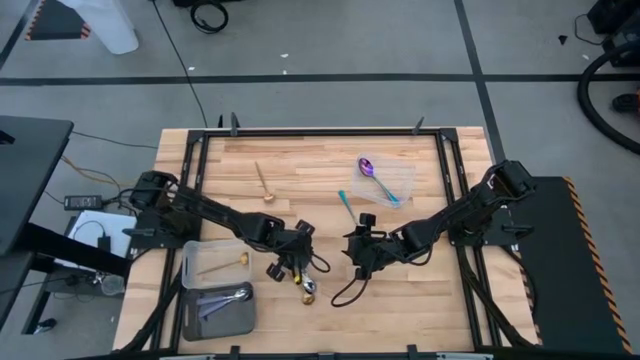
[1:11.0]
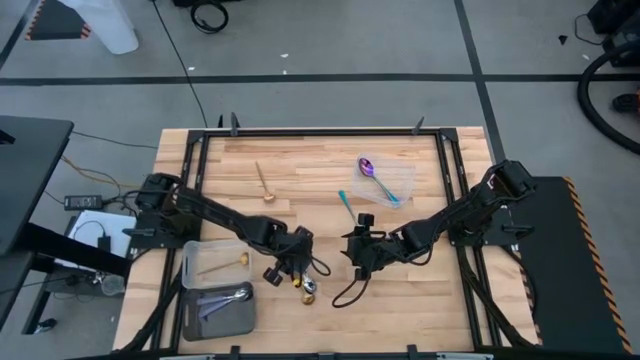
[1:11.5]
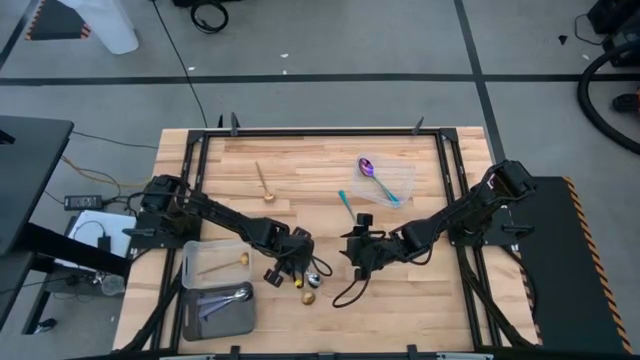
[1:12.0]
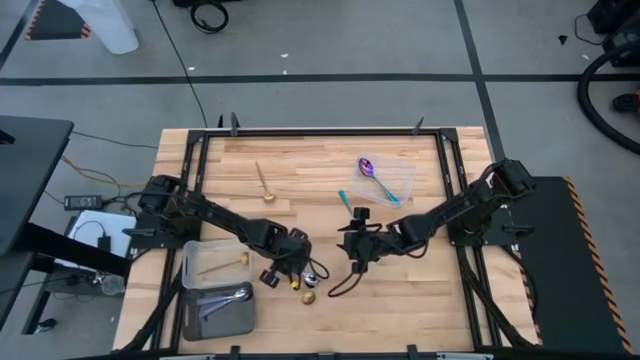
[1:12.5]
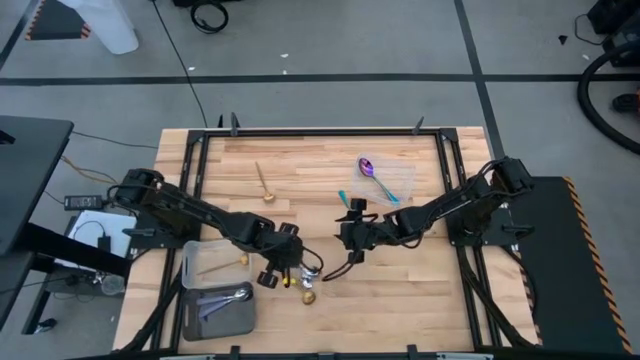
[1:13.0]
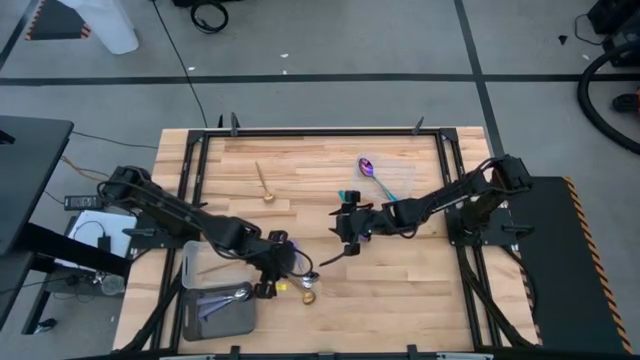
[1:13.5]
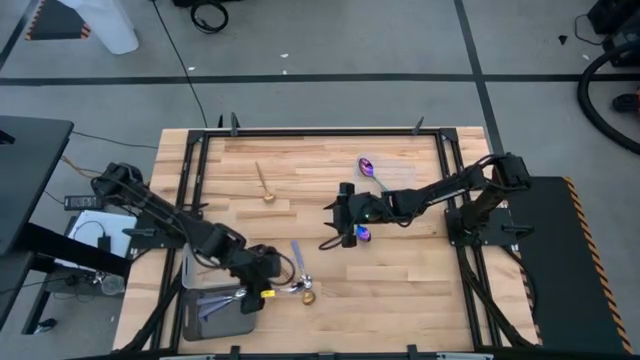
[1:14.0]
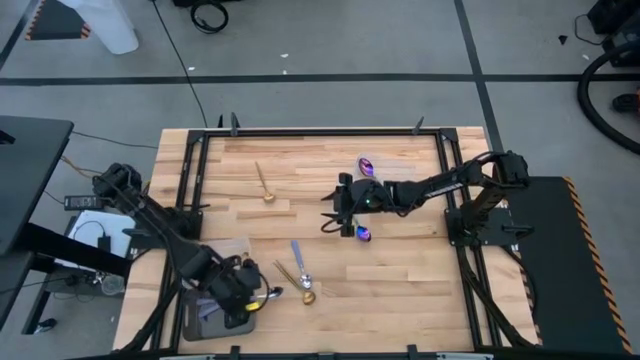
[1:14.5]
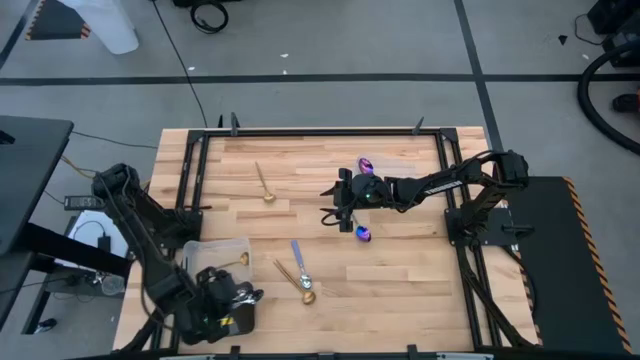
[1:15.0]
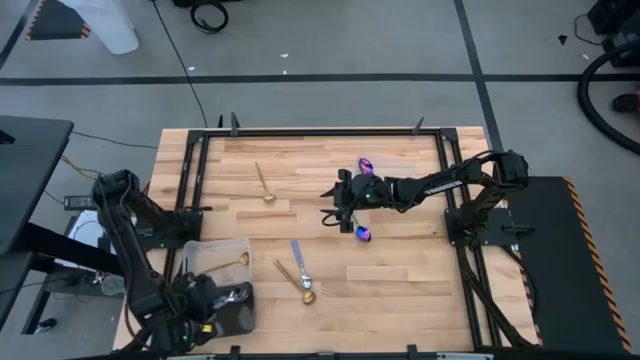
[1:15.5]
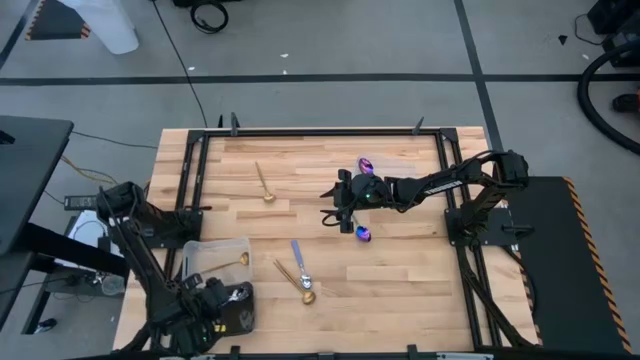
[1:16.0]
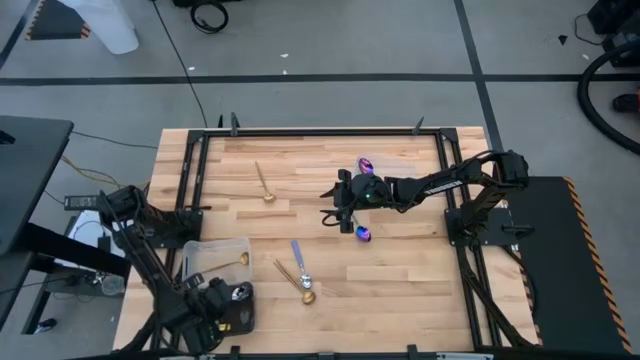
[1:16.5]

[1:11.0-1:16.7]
Task: Sort silverware by color (type)
Put the purple spoon into the black bin

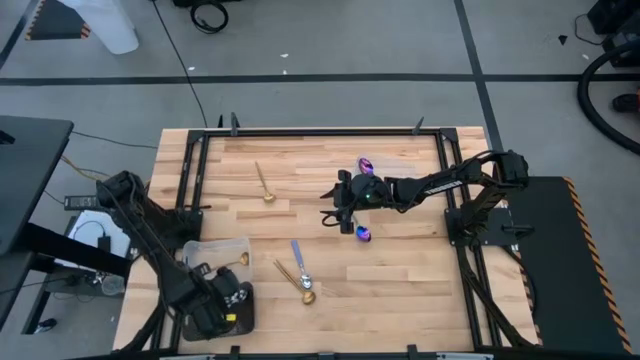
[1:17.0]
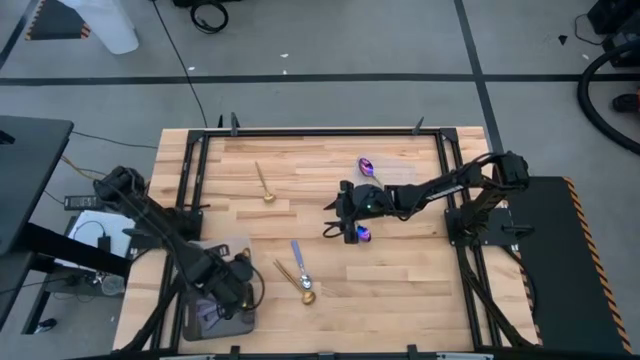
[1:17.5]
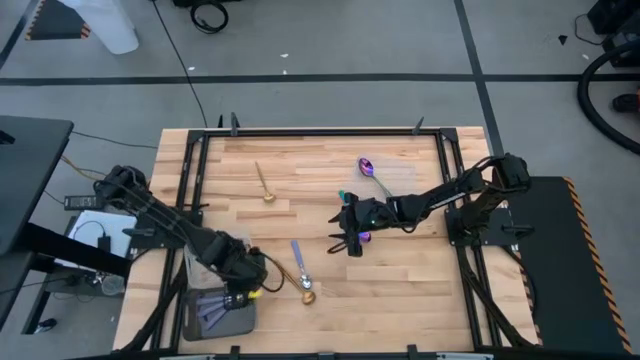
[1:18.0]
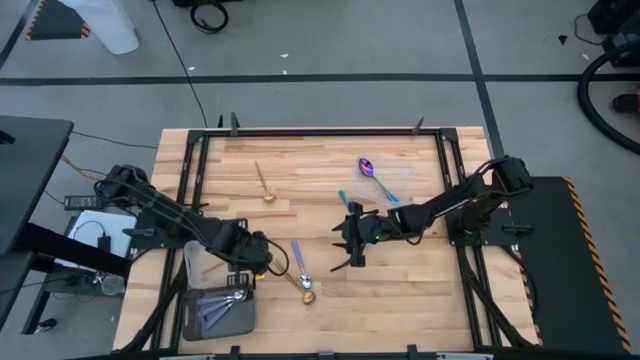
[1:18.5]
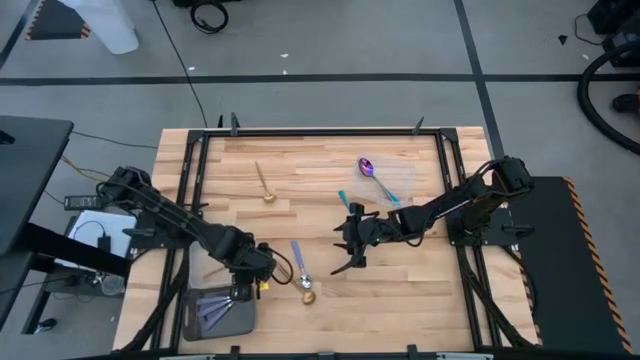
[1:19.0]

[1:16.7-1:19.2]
Adjust the bottom transparent bin

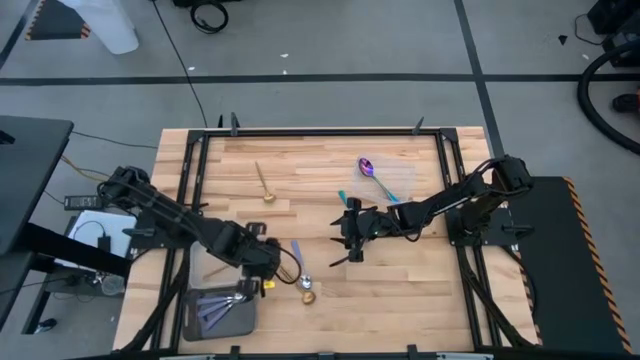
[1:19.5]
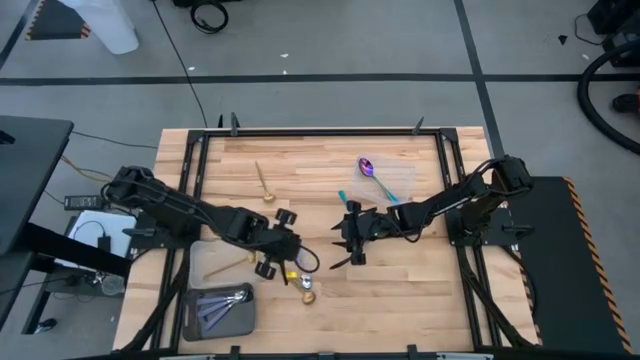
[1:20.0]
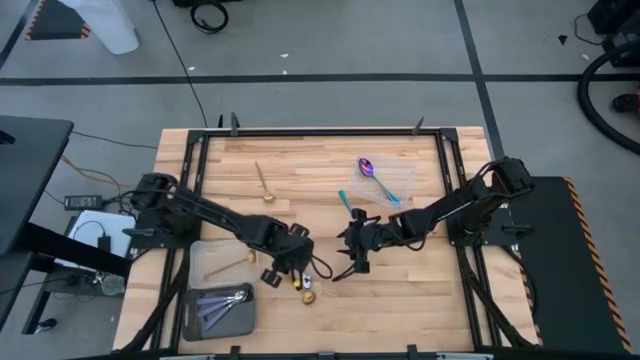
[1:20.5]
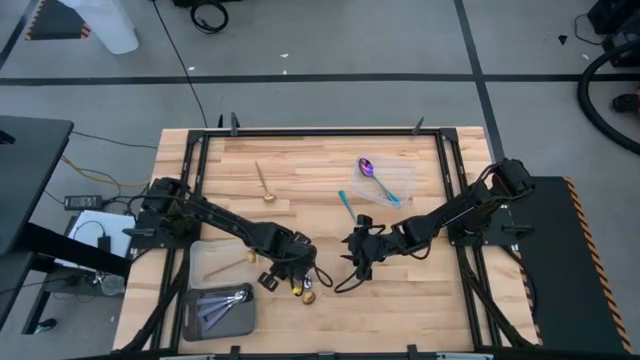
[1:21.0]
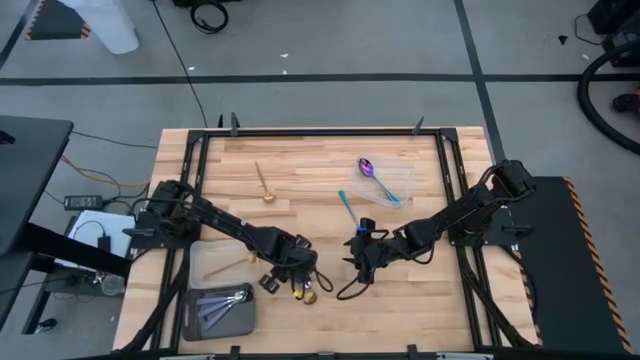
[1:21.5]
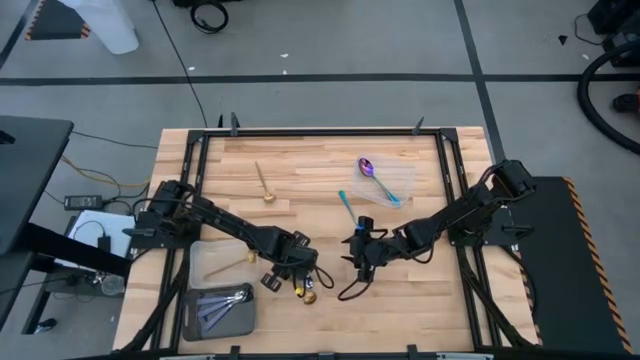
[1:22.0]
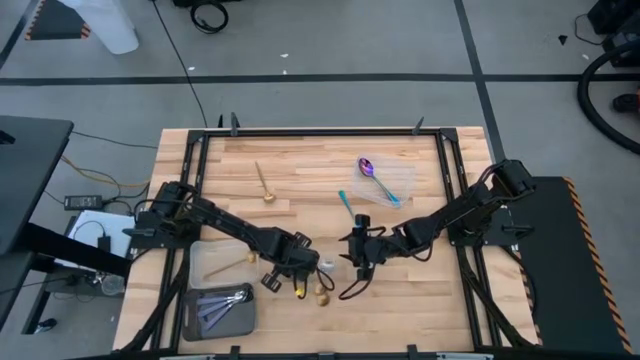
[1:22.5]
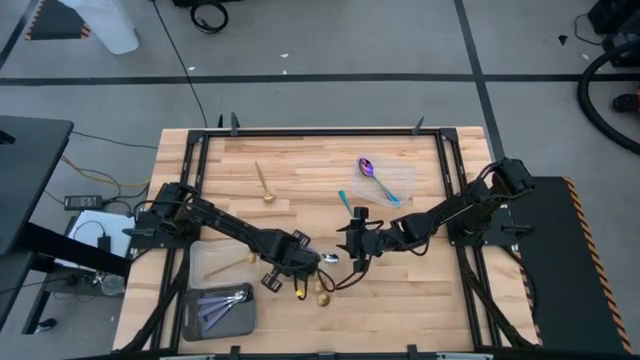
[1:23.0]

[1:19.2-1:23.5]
Put the gold spoon into the bottom transparent bin

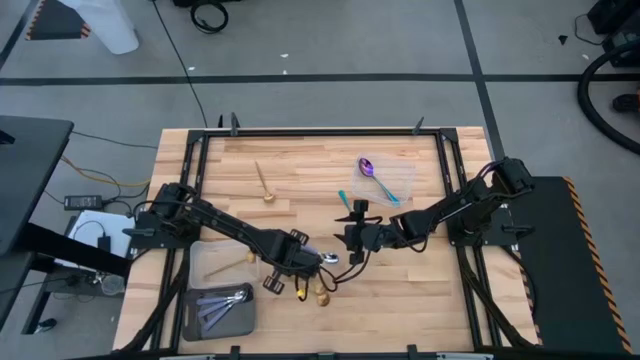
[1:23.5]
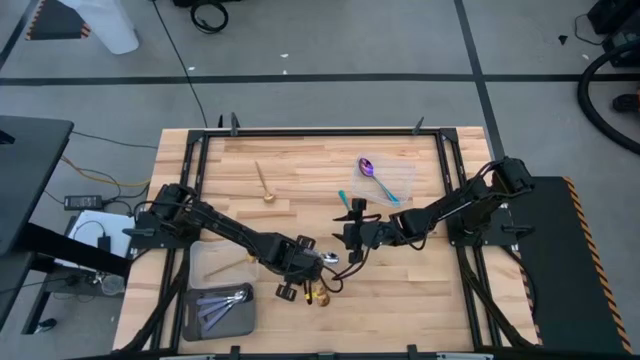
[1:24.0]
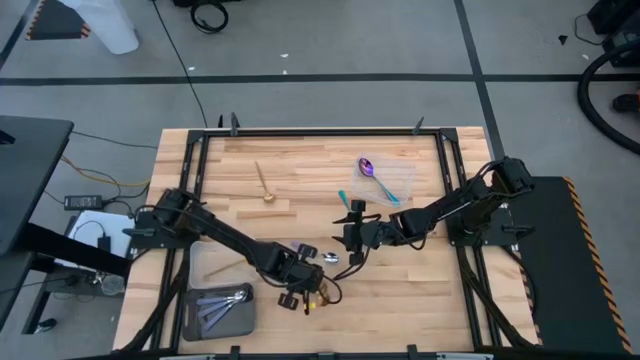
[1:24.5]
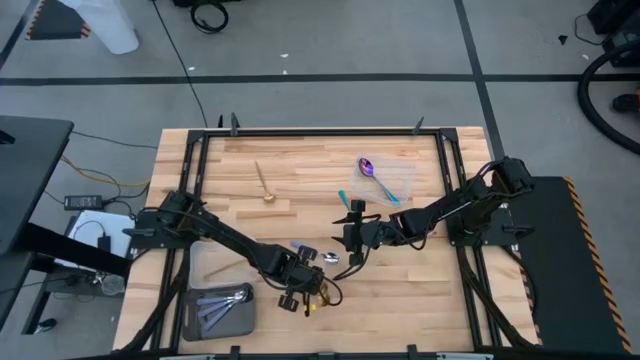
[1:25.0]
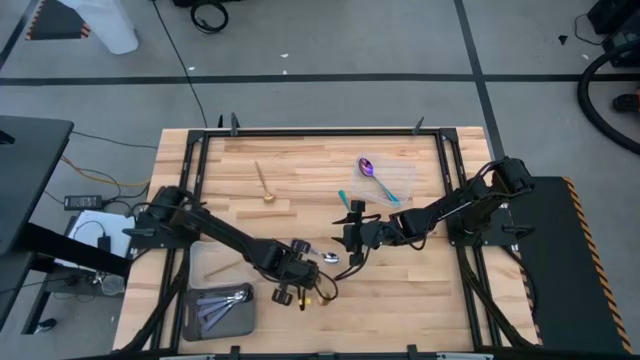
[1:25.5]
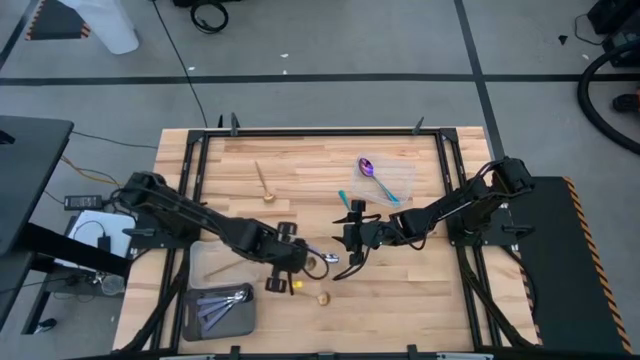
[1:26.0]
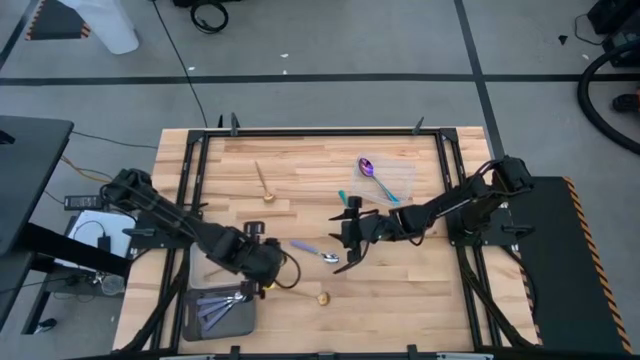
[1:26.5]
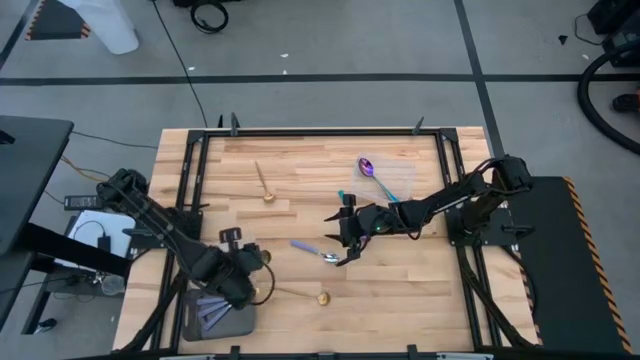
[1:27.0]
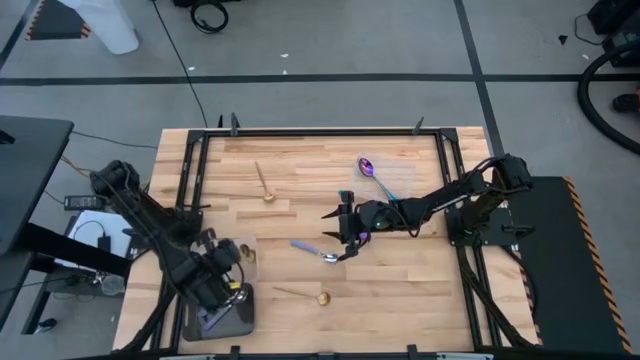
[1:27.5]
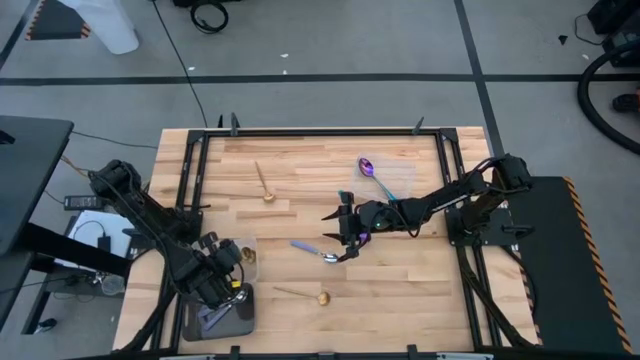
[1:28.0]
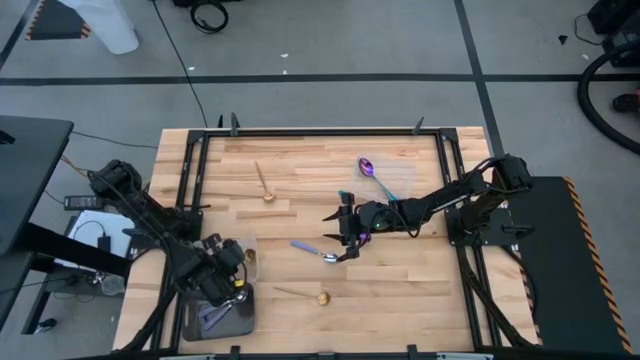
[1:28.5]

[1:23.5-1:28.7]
Put the gold spoon into the bottom transparent bin

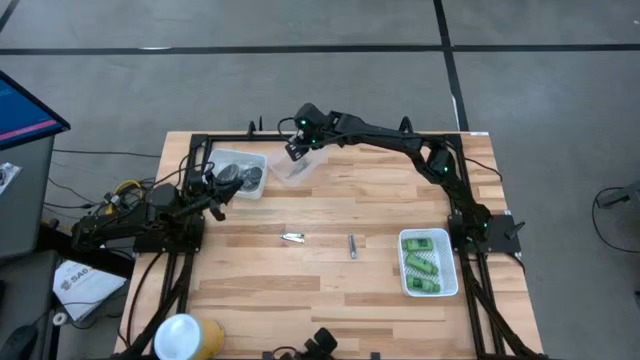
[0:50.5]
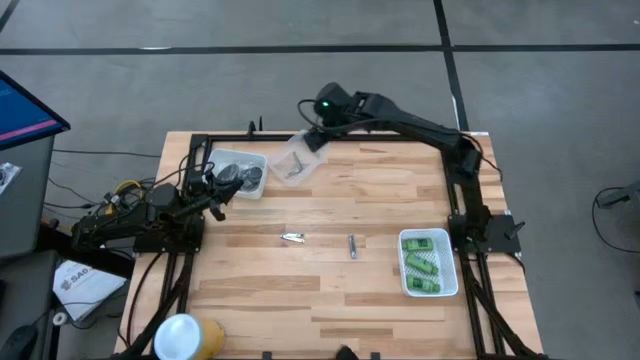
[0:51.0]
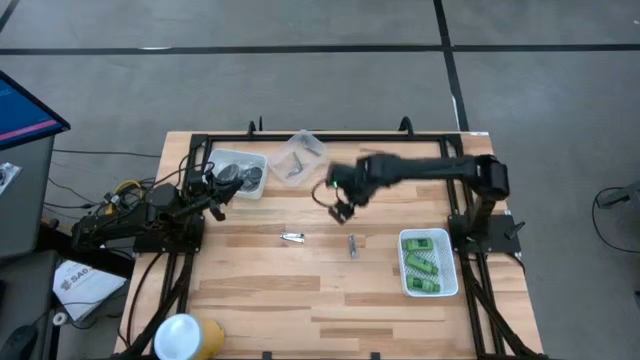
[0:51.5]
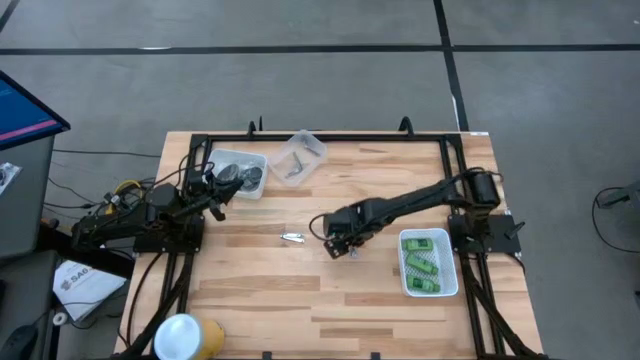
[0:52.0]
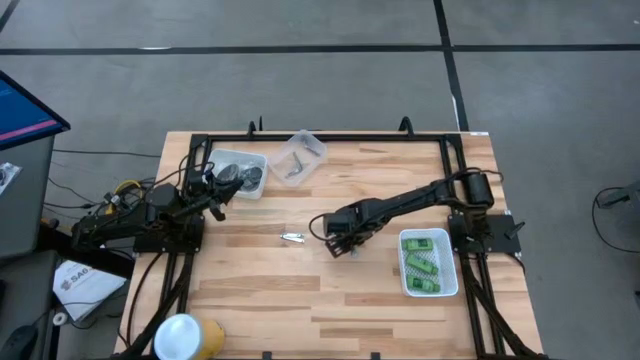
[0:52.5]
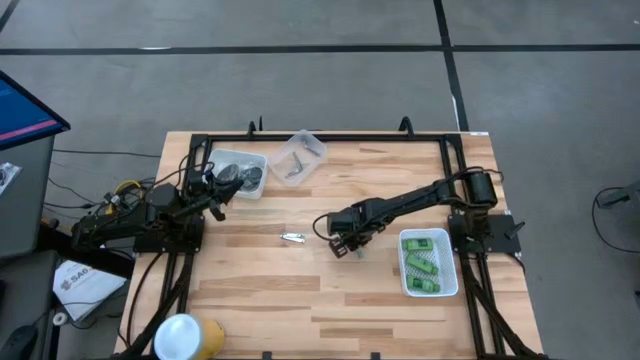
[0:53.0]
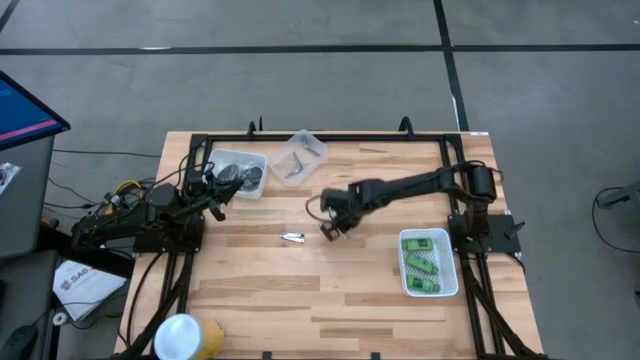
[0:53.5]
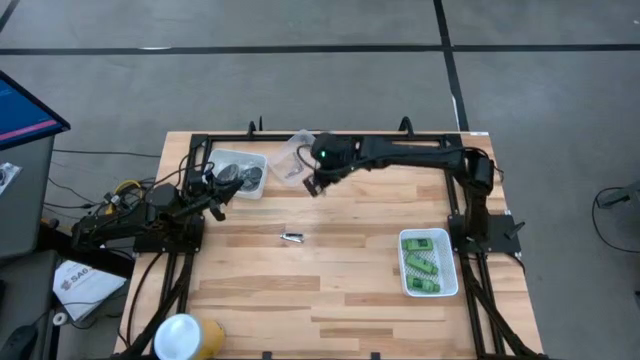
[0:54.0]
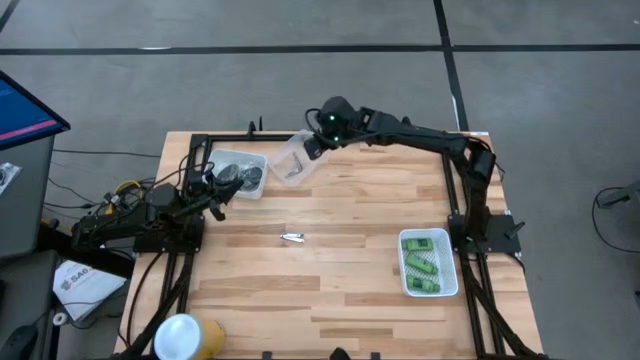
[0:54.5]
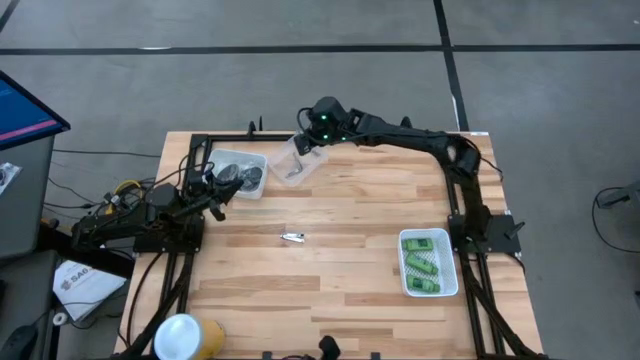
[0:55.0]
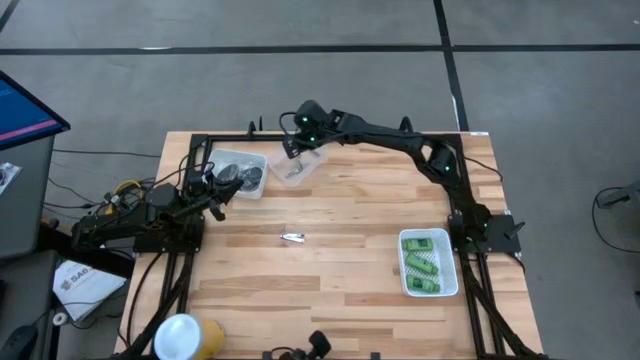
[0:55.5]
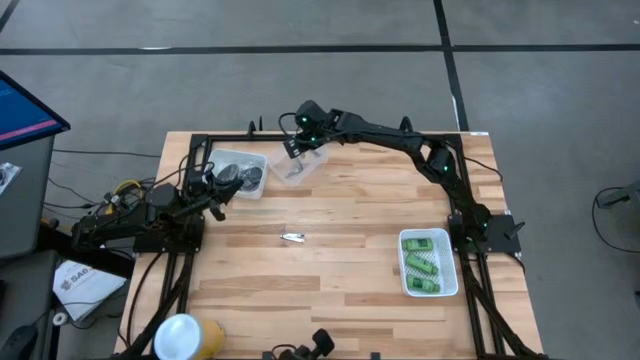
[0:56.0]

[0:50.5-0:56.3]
Task: Pick & Place Travel size toiletries
Put the silver nail cutter into the transparent bin
